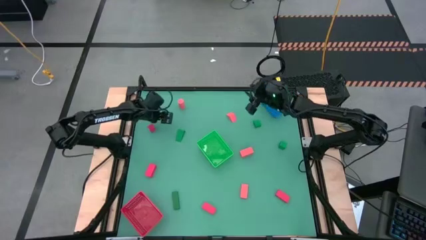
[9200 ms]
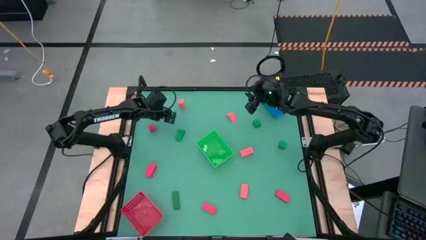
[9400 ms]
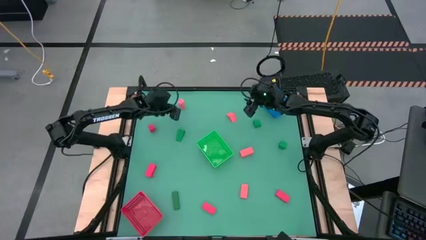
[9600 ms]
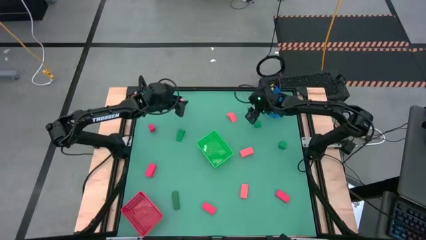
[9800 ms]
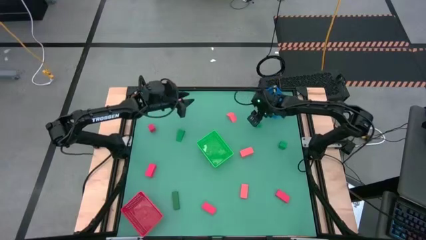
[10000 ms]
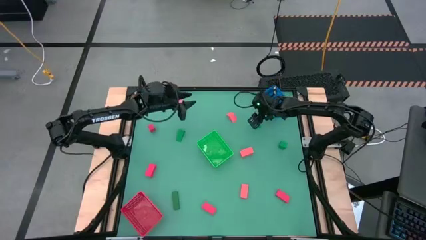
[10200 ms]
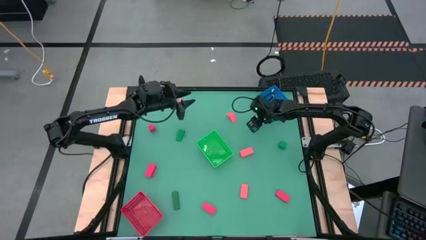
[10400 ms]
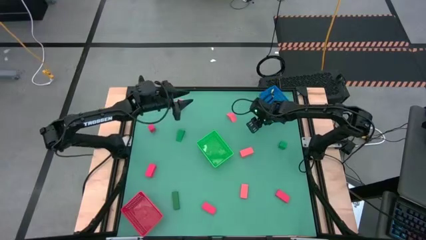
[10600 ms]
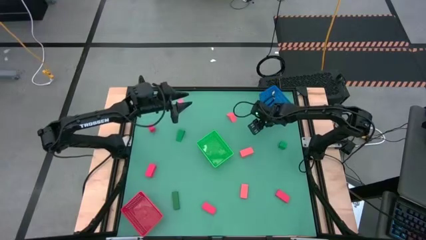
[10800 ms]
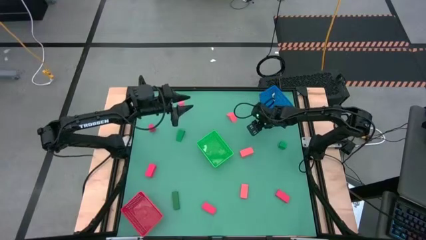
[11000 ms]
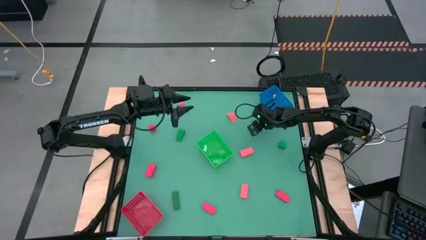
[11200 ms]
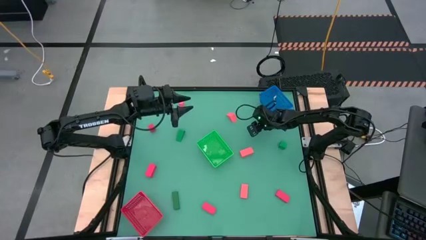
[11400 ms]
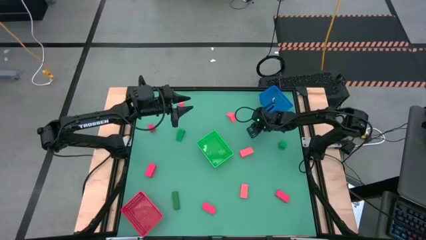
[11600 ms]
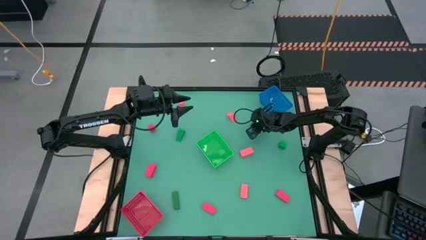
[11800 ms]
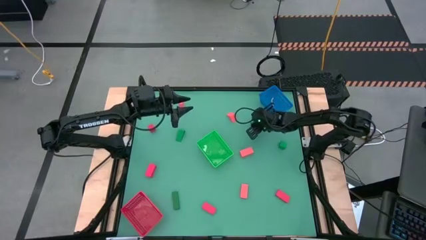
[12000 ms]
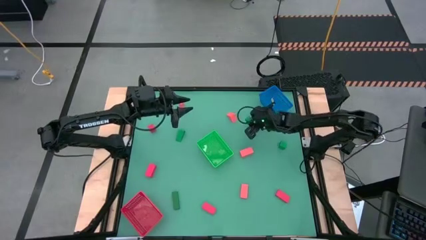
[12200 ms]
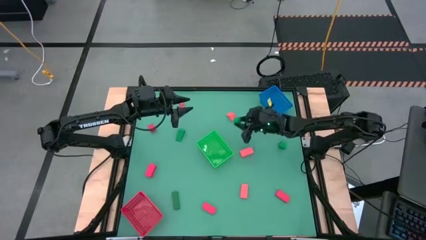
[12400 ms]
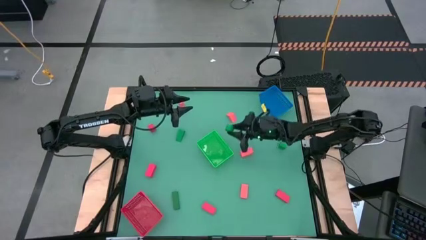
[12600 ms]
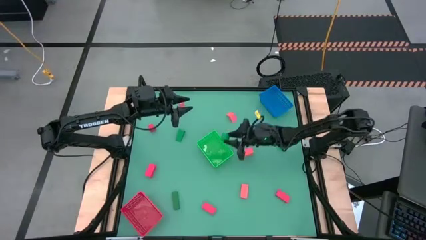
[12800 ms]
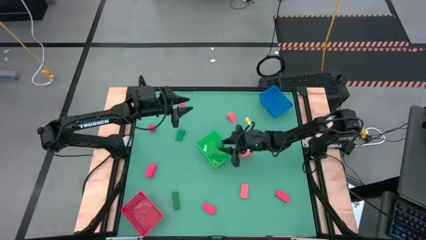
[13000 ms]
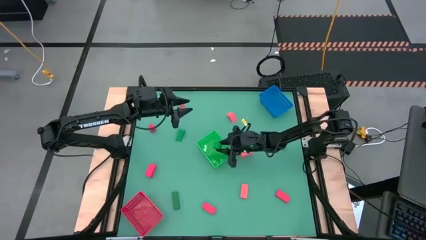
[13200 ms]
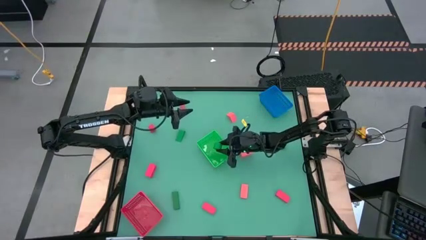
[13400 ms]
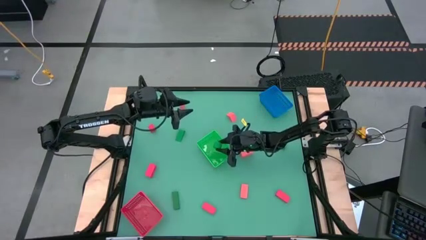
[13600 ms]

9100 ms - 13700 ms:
Task: Sort & place blocks by color
Put the green block into the green bin

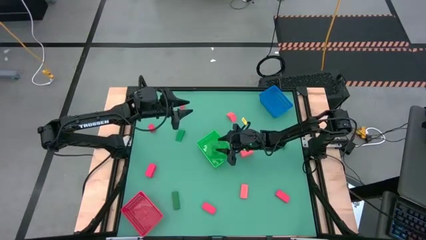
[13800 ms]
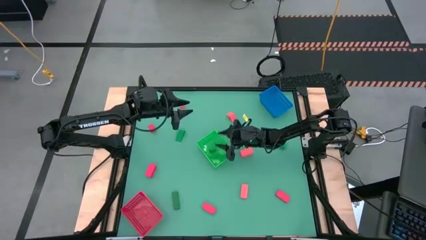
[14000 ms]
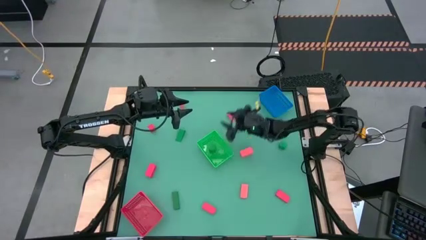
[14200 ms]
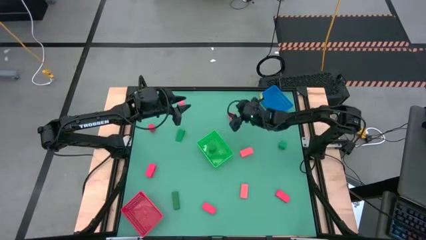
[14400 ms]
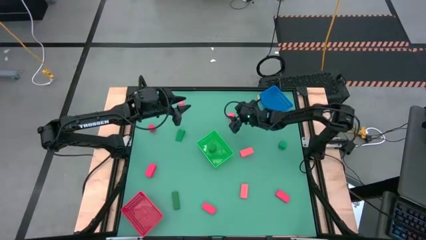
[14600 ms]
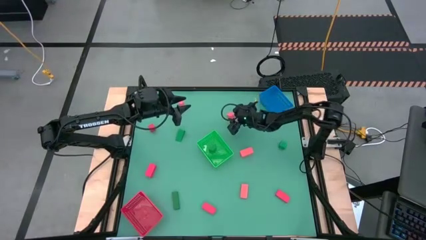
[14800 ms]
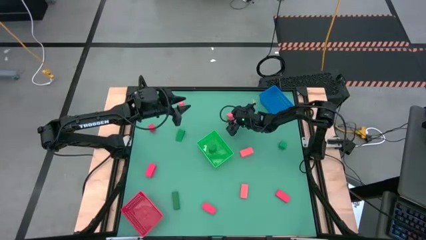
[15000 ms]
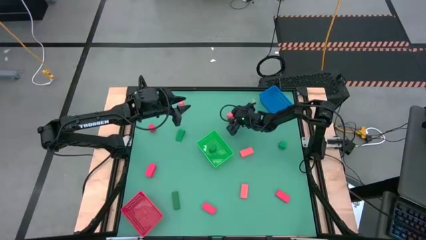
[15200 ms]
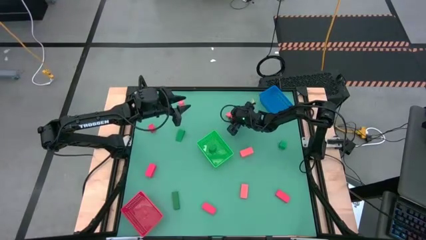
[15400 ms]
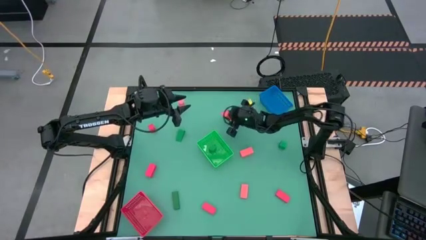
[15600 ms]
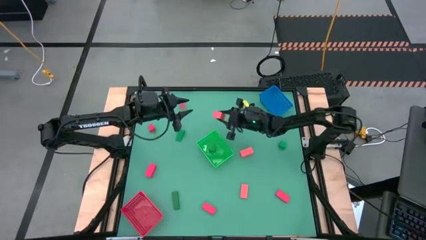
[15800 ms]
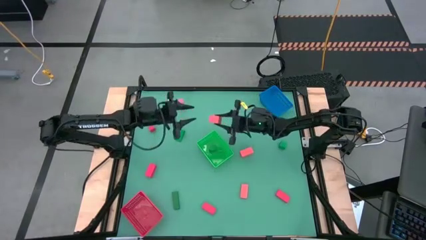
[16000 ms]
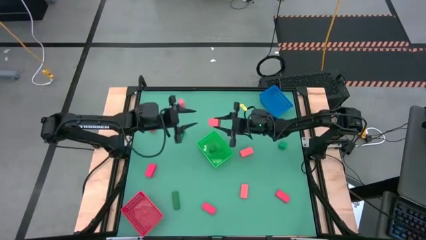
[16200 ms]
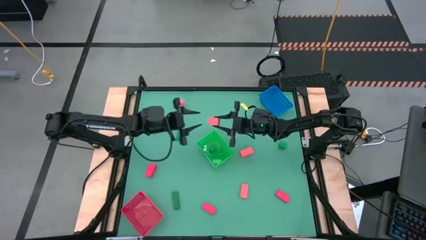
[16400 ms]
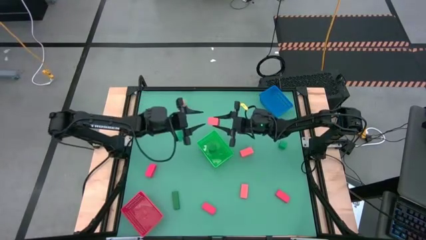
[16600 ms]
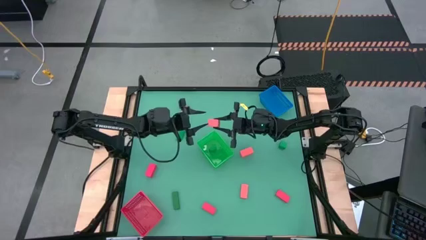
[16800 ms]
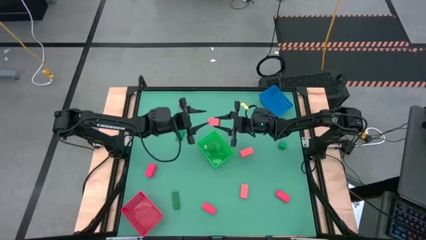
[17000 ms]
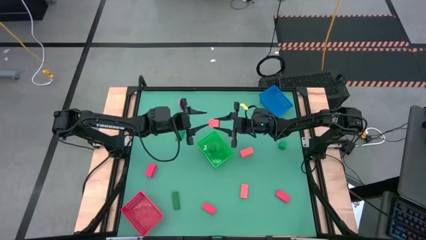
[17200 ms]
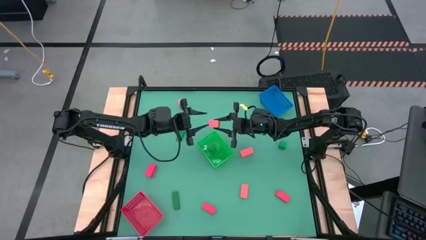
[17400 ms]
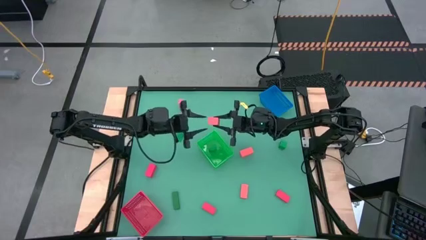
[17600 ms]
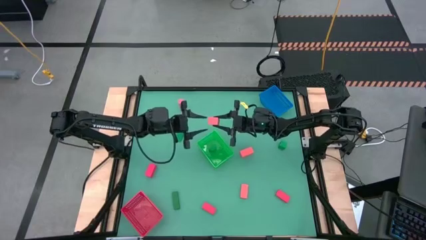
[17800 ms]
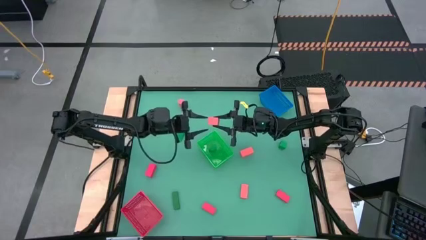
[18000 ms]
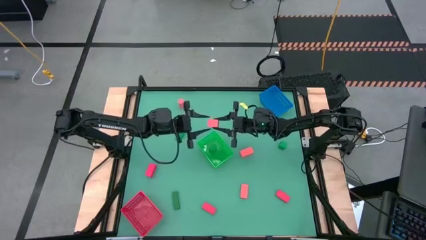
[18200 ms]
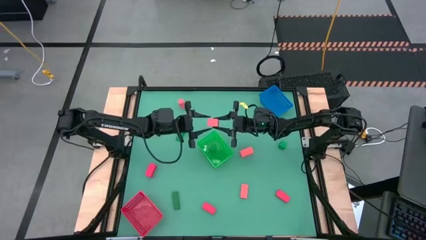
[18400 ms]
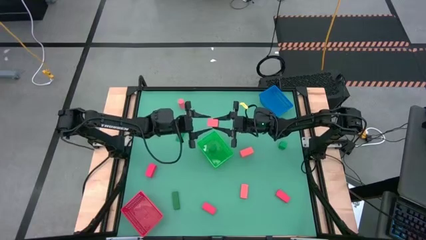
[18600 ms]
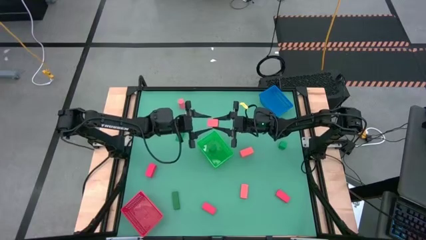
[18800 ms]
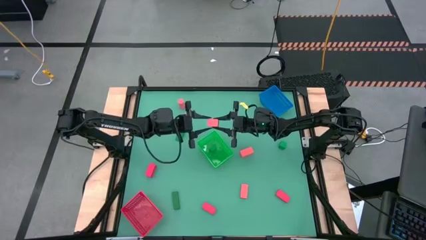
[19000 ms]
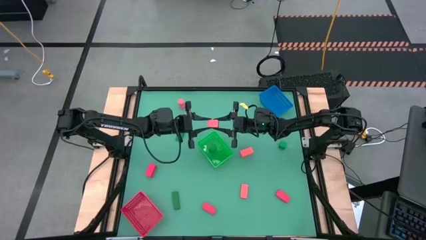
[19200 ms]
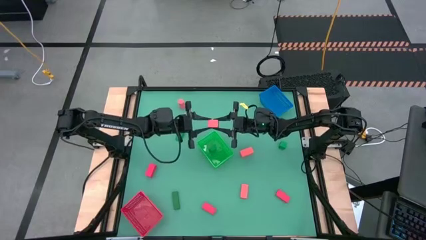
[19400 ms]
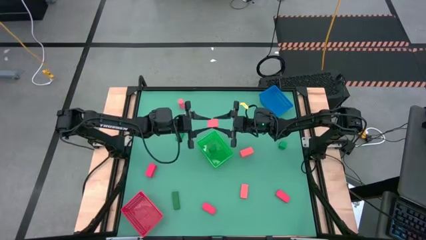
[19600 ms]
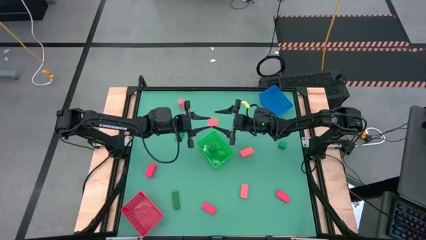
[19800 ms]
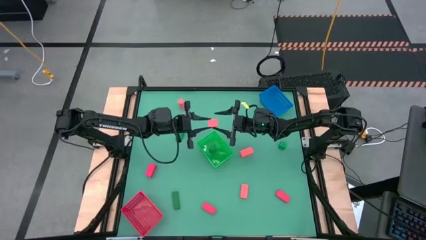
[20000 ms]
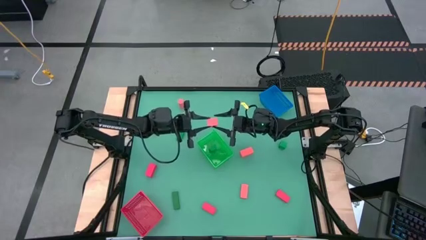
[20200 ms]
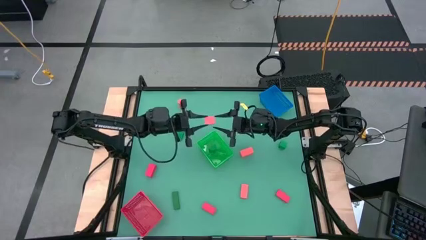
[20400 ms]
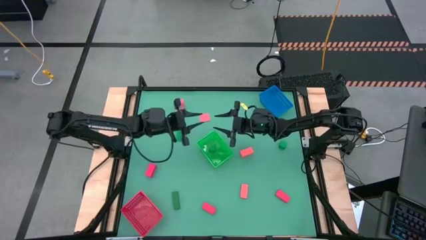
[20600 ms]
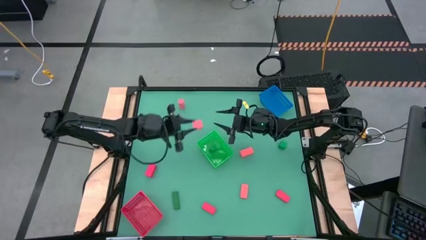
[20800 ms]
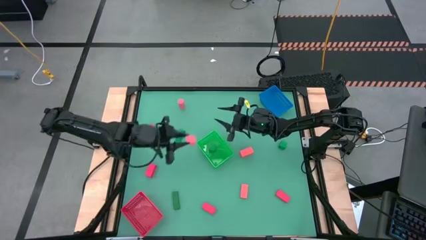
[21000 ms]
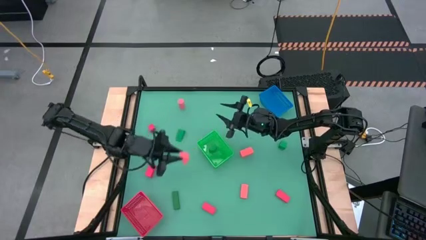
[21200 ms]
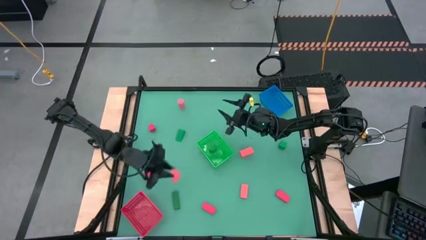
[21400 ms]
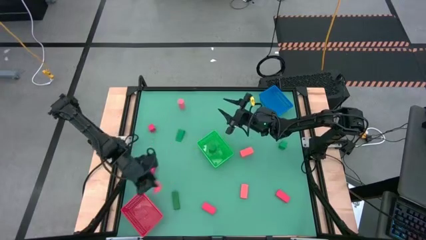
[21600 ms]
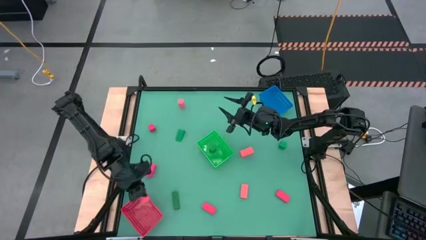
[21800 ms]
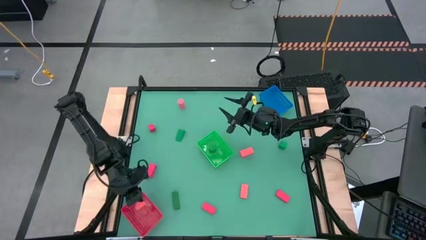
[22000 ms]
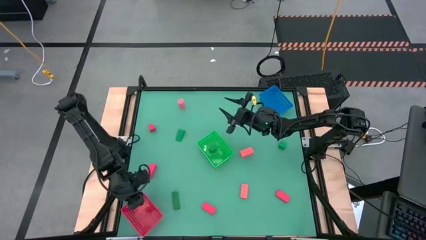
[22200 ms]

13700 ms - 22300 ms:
Put the pink block into the red bin
